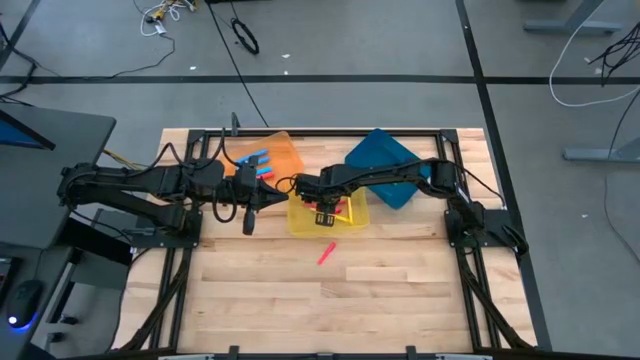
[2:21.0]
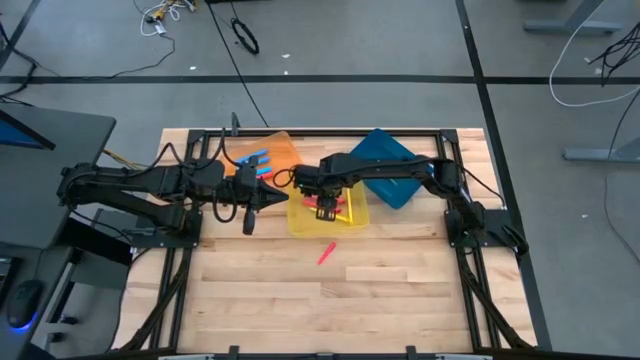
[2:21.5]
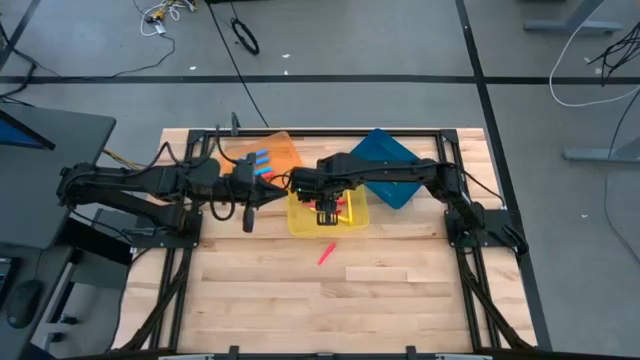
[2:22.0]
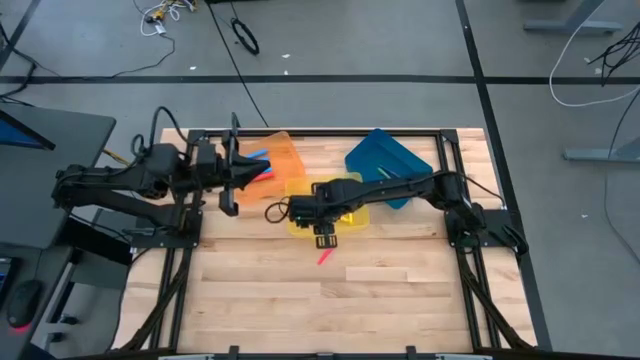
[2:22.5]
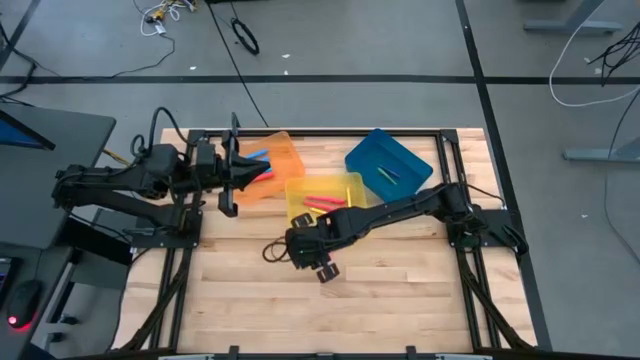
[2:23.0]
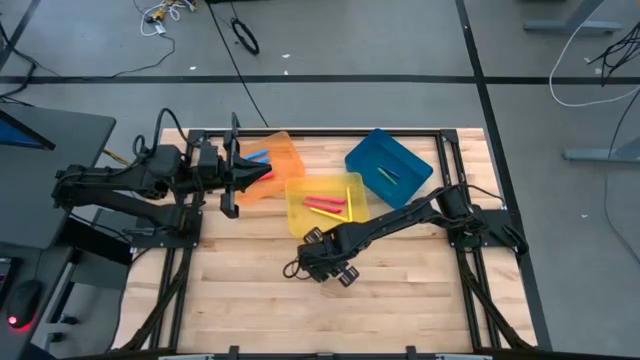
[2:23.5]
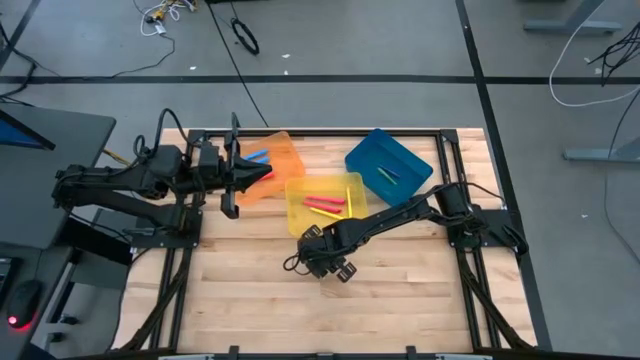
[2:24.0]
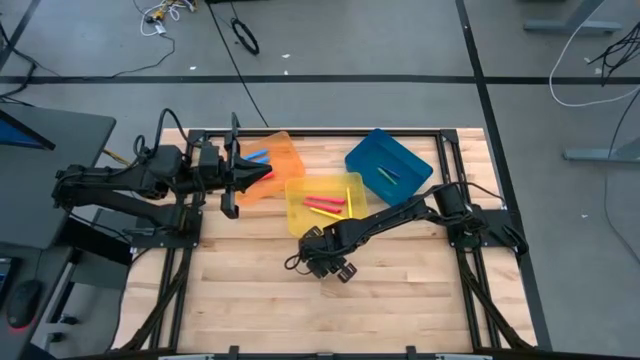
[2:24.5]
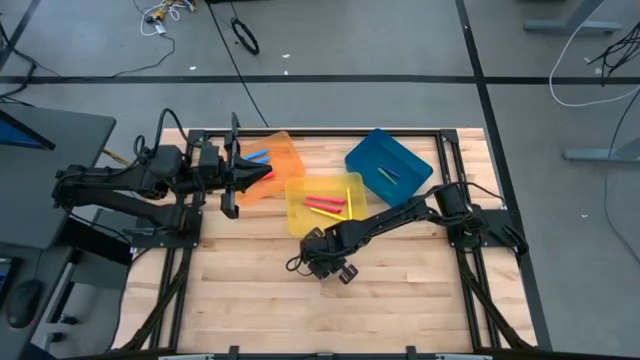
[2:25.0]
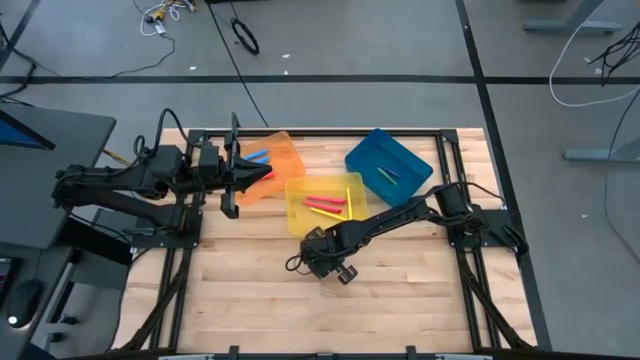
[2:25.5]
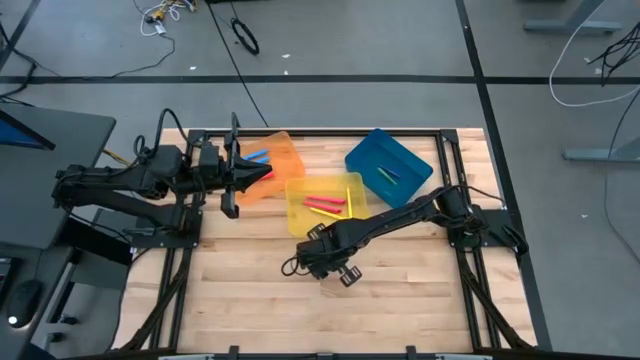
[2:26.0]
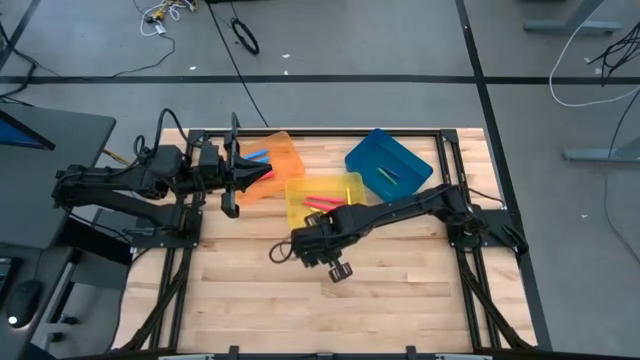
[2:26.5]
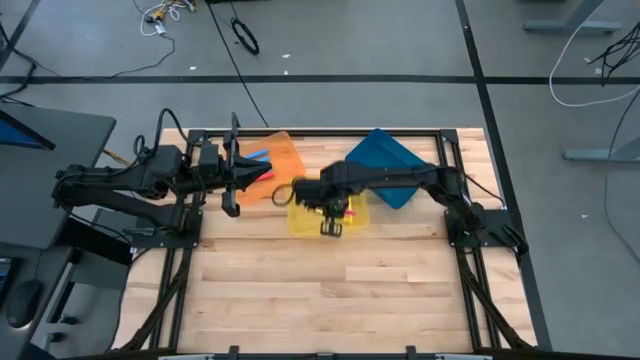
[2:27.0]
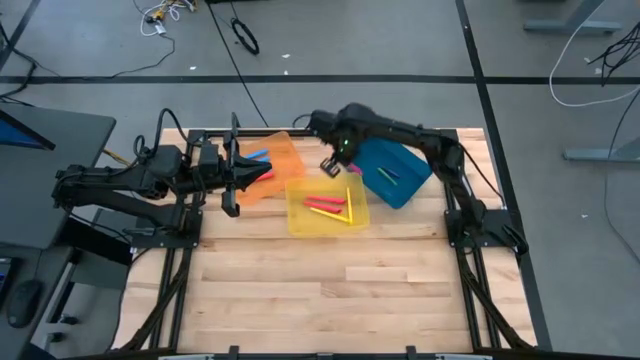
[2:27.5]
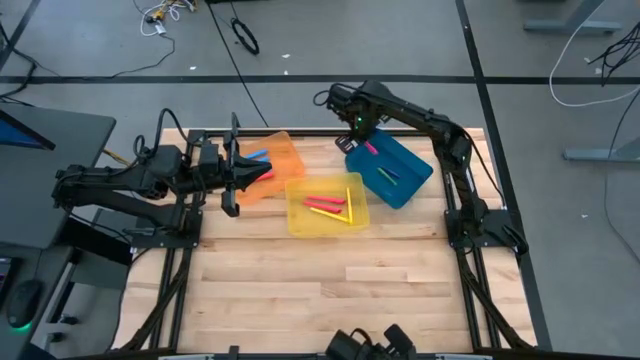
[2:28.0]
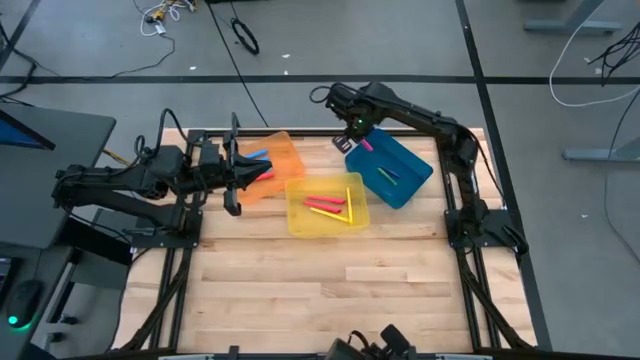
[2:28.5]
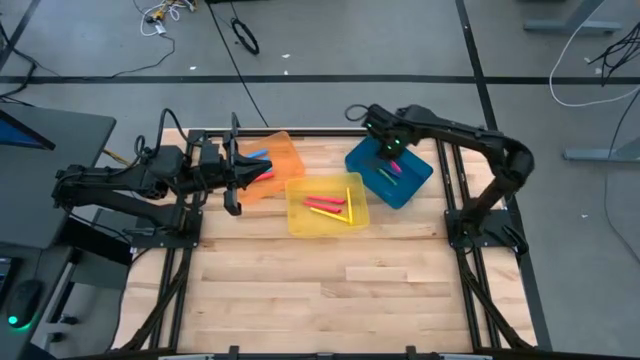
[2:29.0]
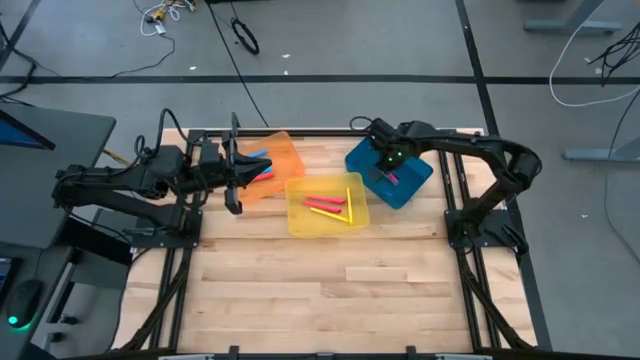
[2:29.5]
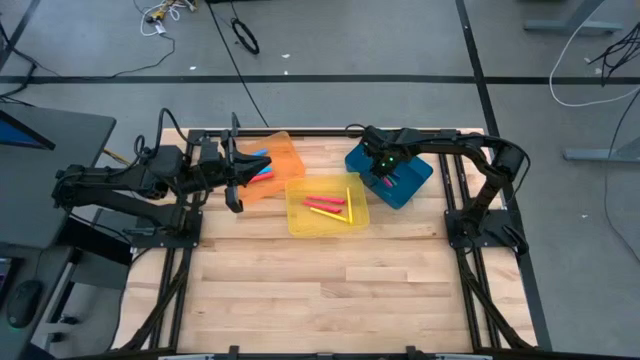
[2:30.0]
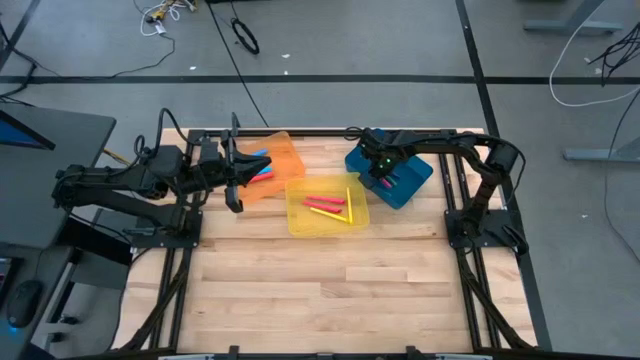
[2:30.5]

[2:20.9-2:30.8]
Task: Pick & Place Markers
Put the pink pen into the blue bin

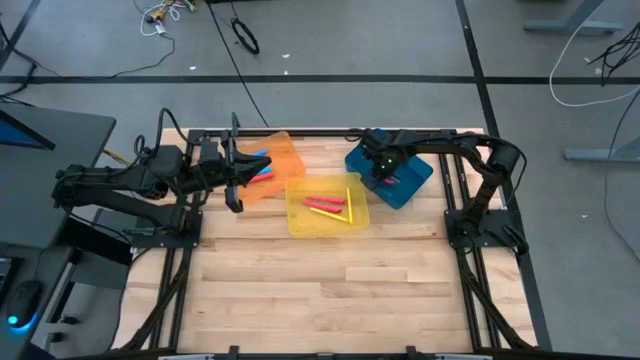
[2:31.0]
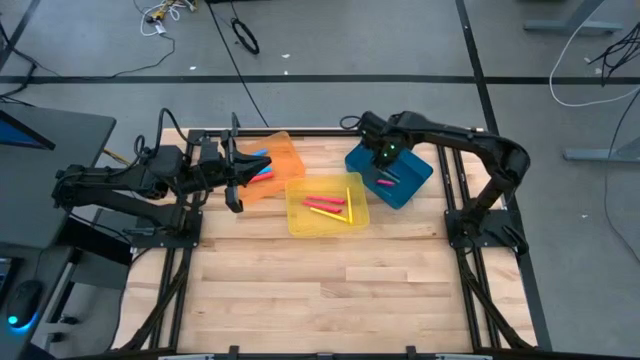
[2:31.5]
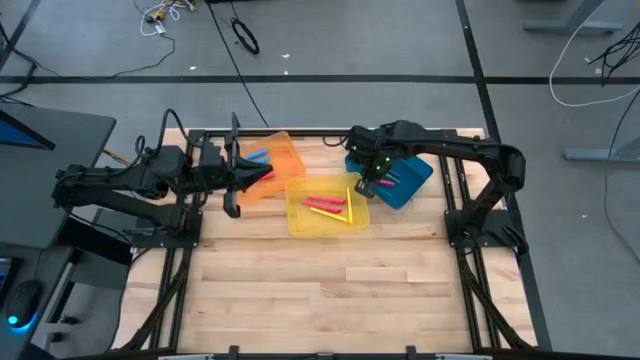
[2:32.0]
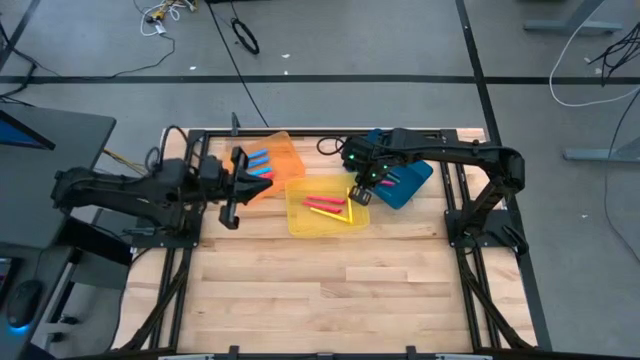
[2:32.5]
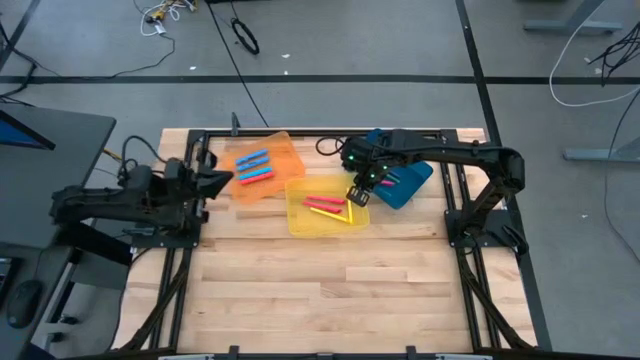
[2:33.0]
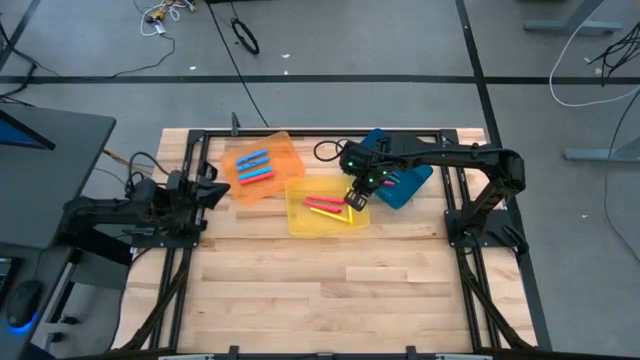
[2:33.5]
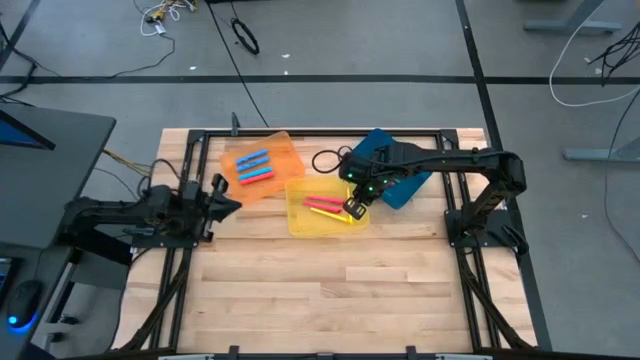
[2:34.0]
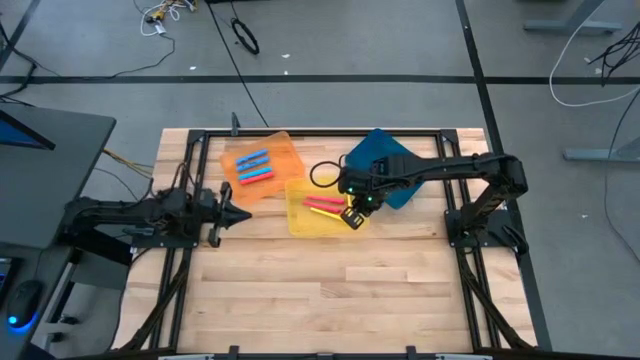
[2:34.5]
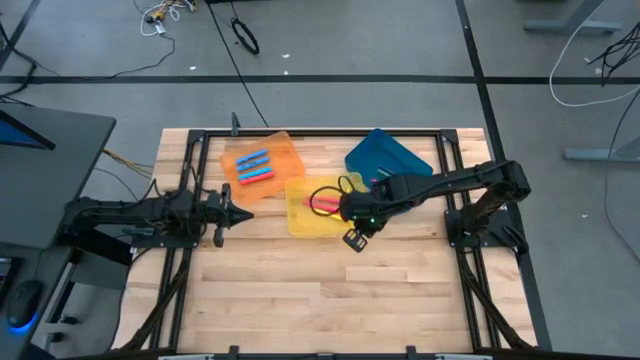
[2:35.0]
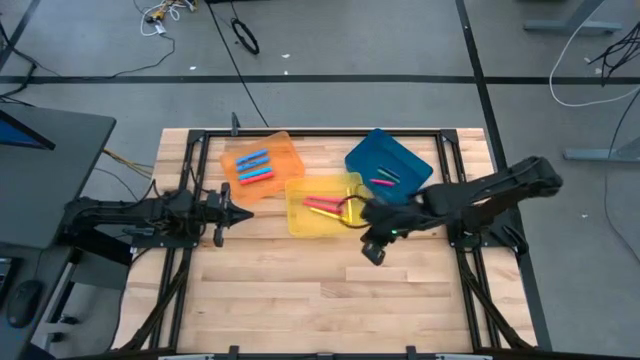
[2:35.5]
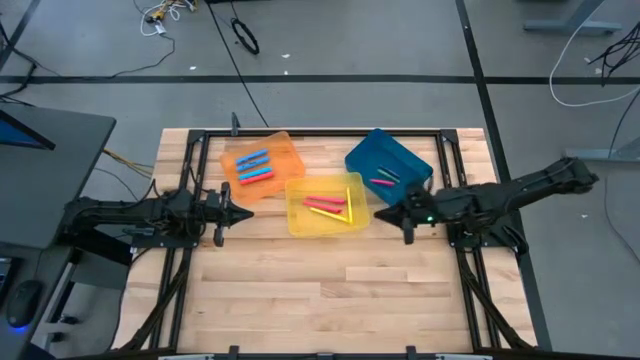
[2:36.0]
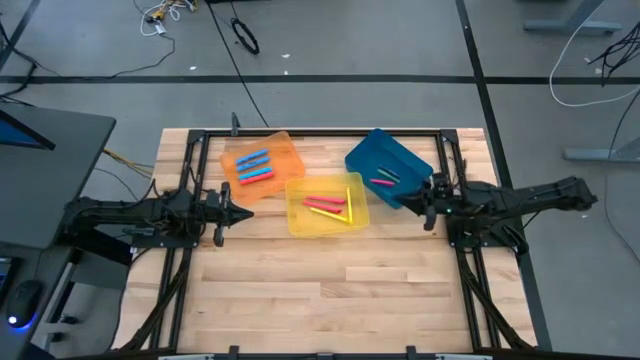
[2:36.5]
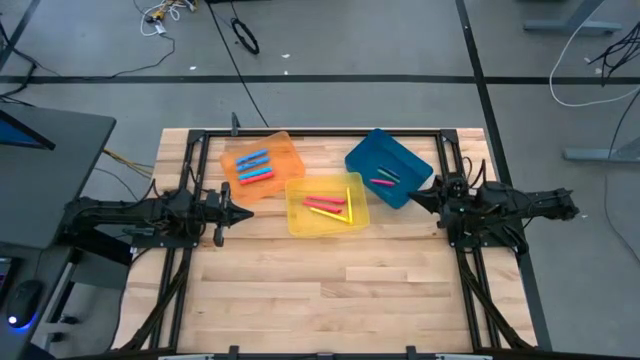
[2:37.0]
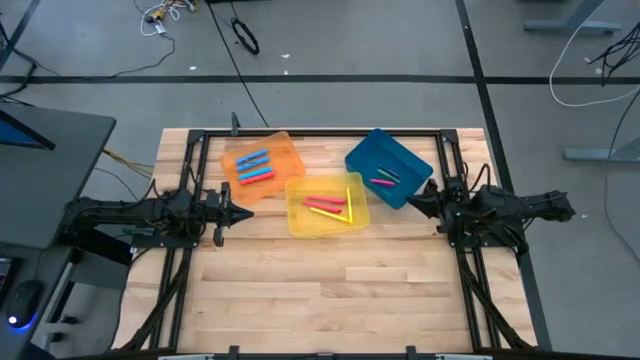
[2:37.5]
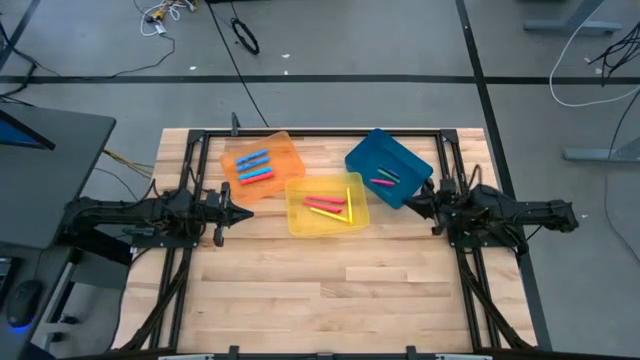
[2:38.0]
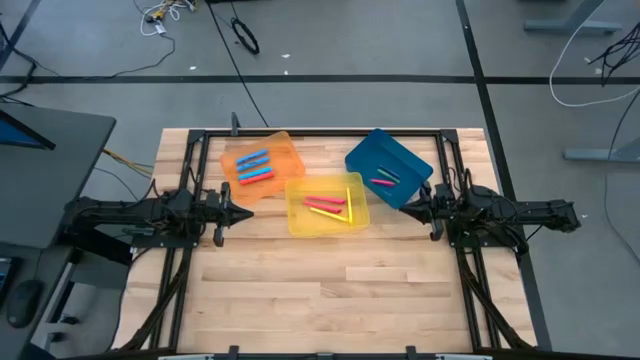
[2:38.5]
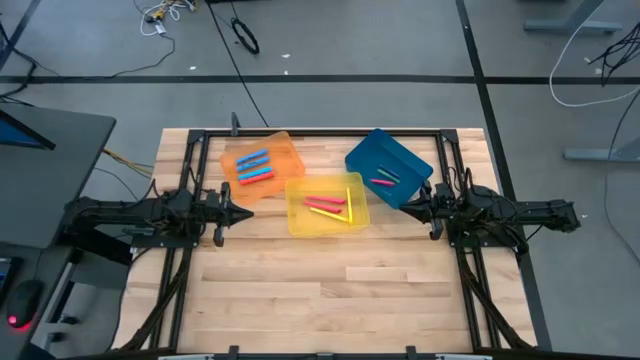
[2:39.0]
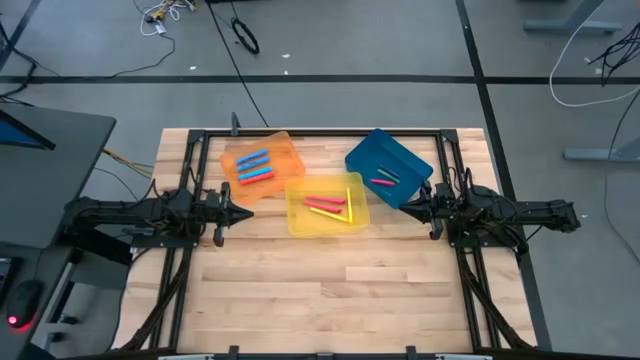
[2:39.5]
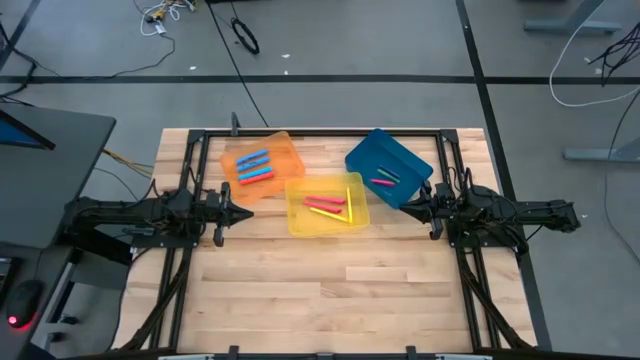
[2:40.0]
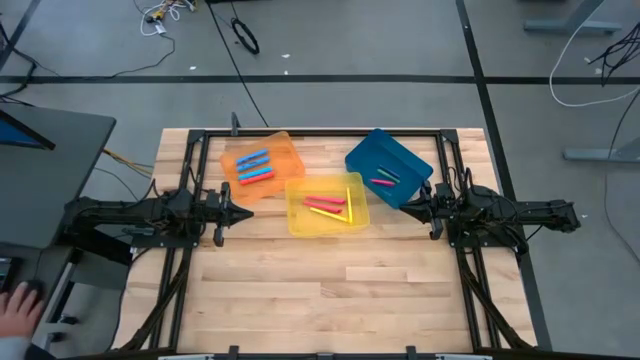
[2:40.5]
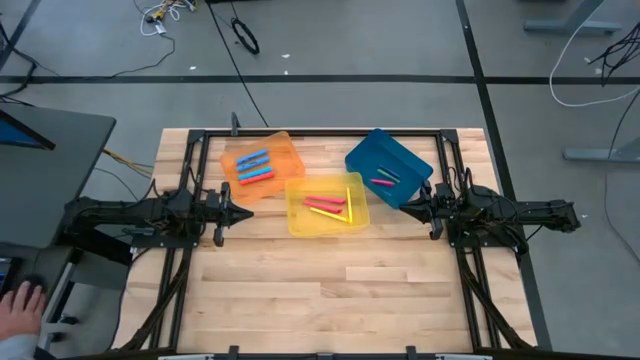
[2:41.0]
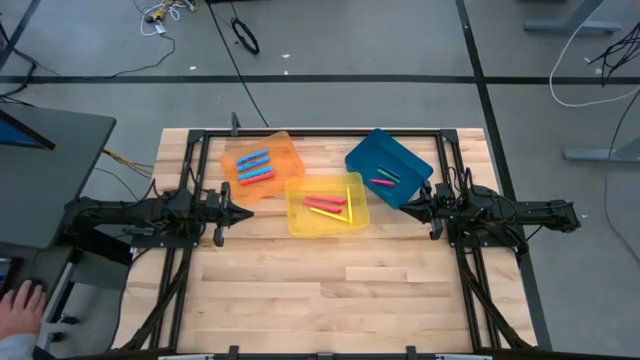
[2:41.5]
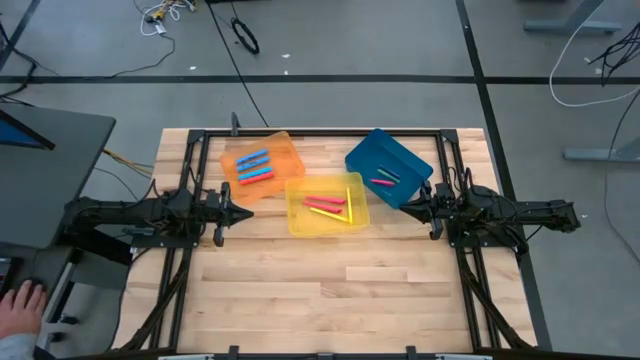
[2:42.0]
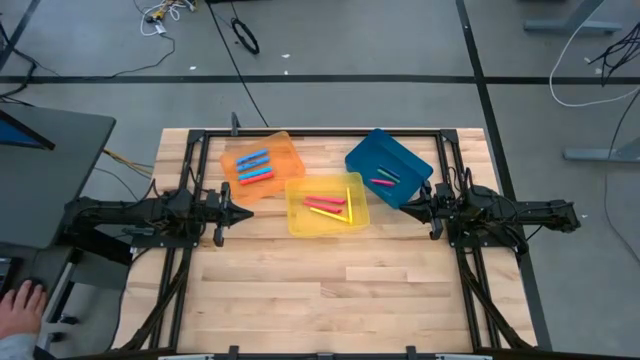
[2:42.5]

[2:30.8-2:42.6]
Return to Home Position
